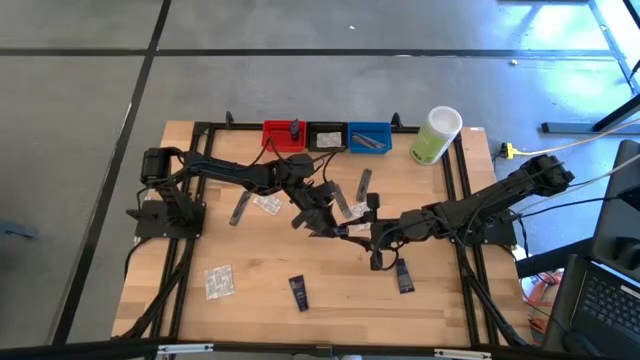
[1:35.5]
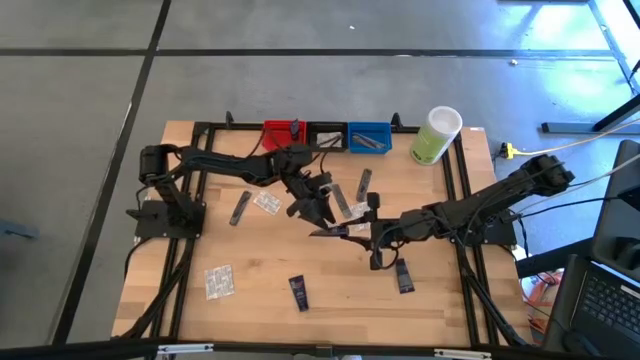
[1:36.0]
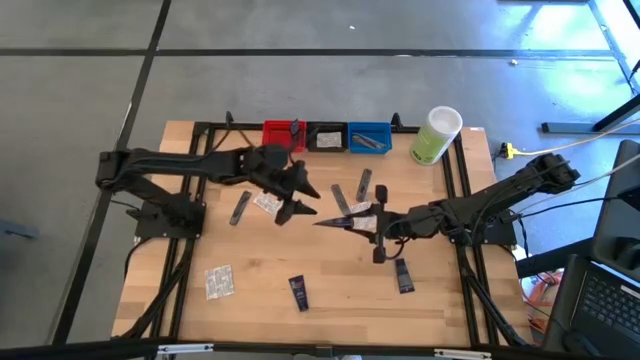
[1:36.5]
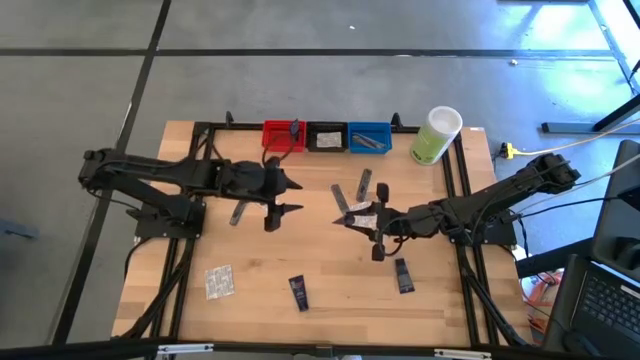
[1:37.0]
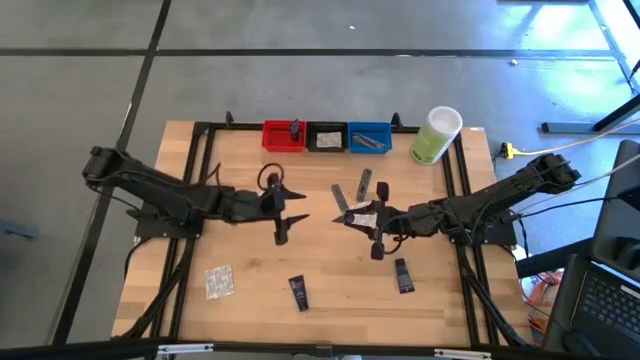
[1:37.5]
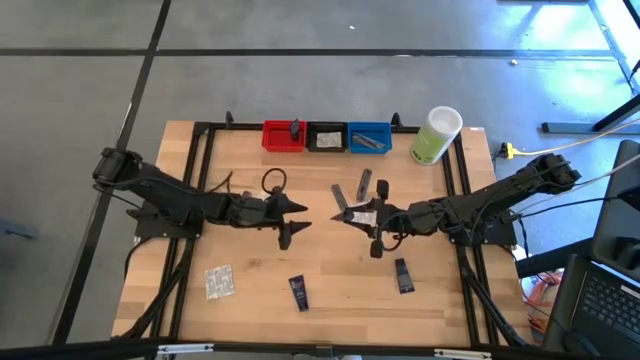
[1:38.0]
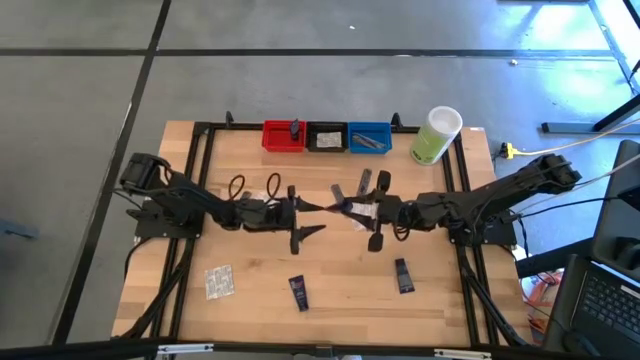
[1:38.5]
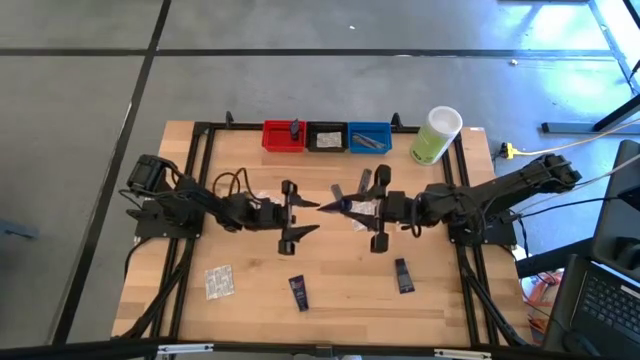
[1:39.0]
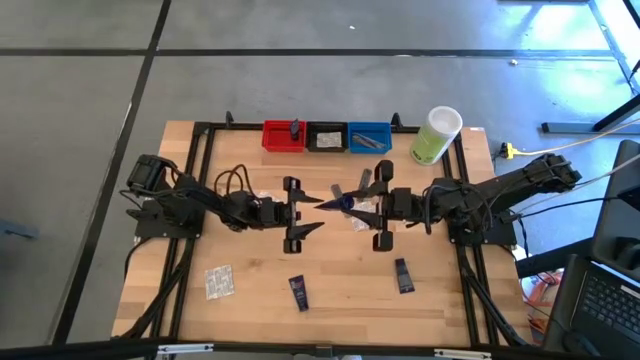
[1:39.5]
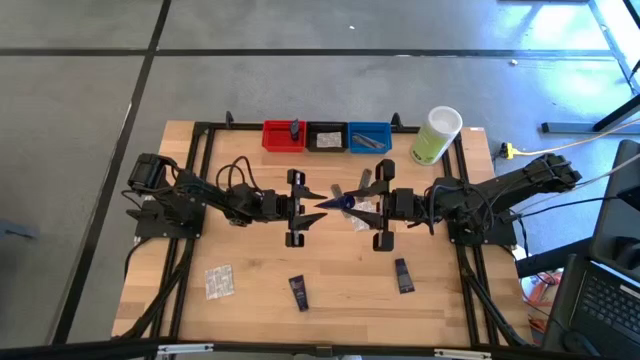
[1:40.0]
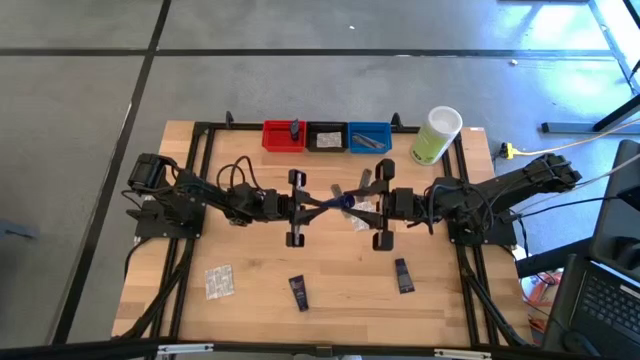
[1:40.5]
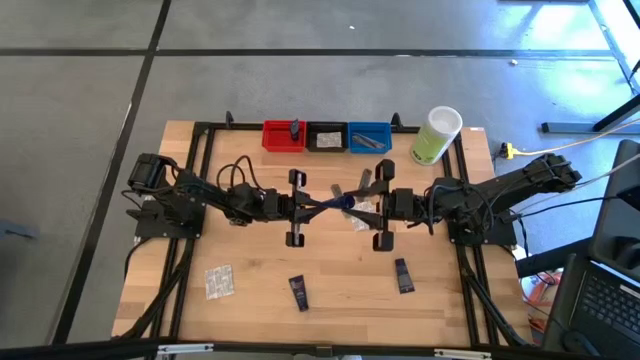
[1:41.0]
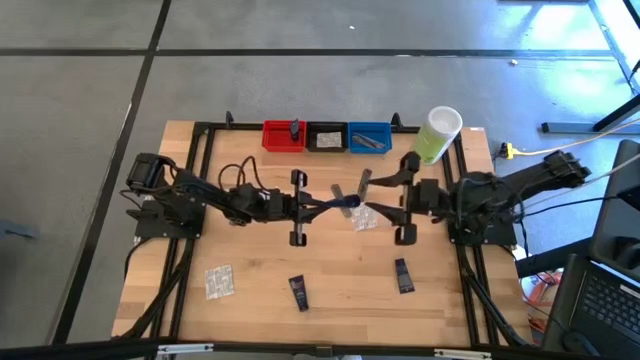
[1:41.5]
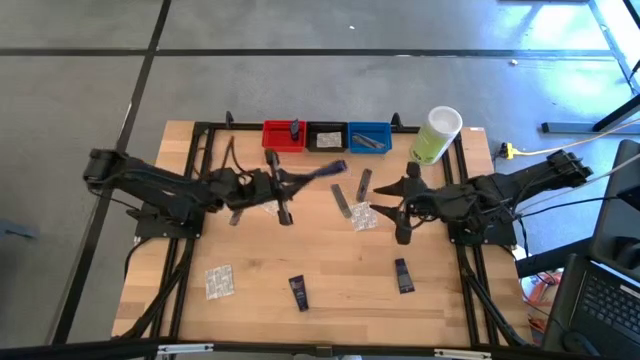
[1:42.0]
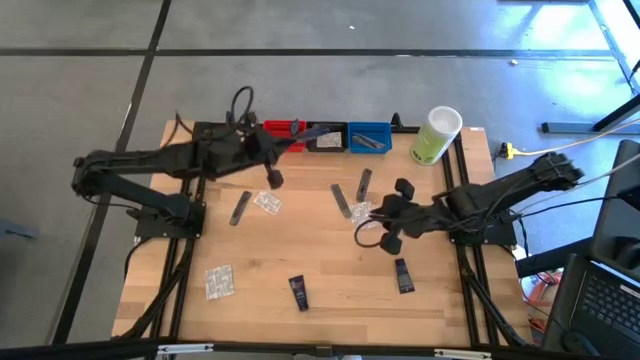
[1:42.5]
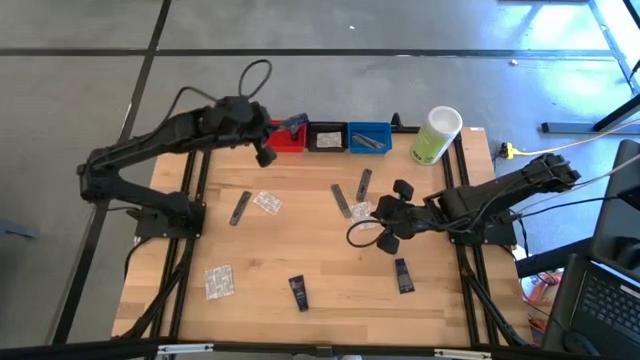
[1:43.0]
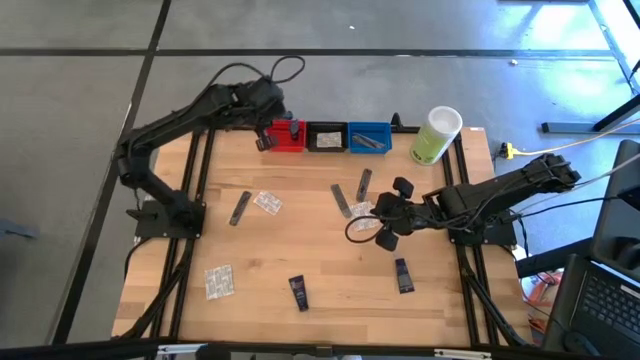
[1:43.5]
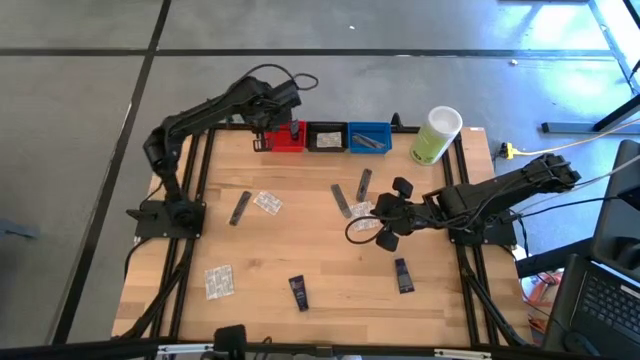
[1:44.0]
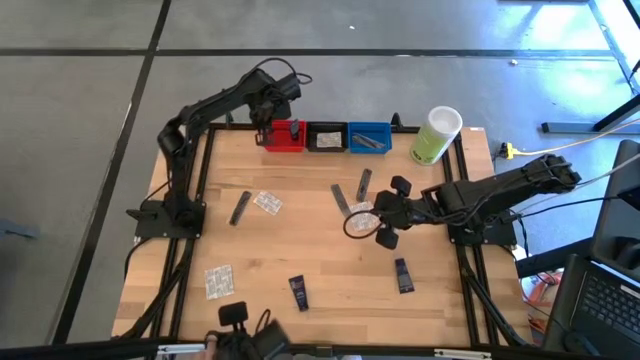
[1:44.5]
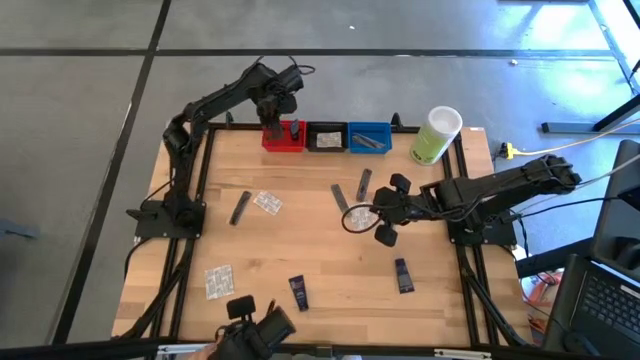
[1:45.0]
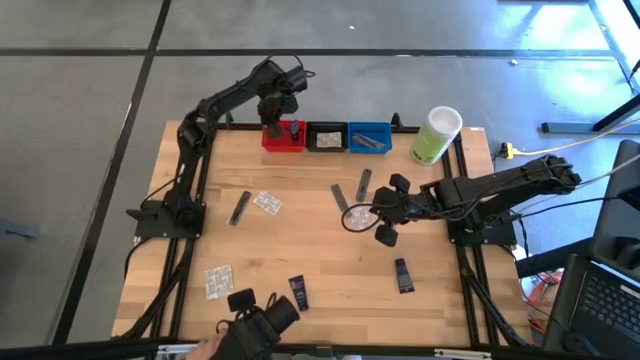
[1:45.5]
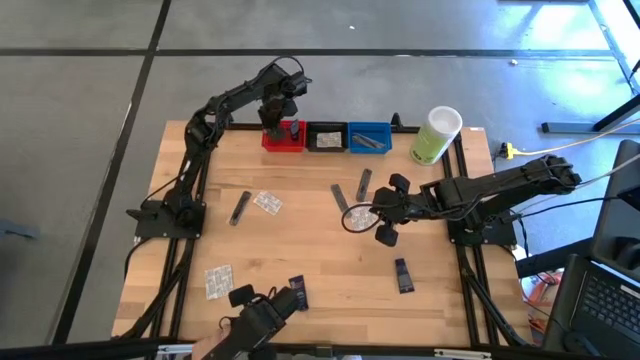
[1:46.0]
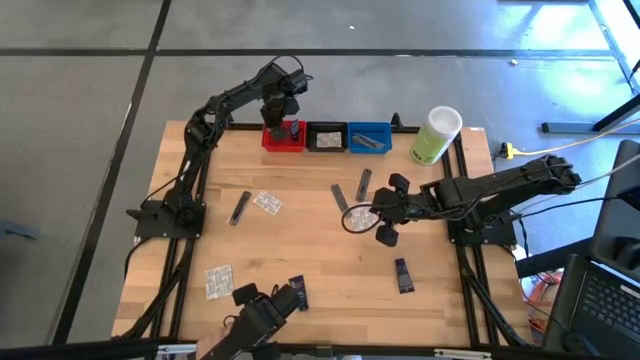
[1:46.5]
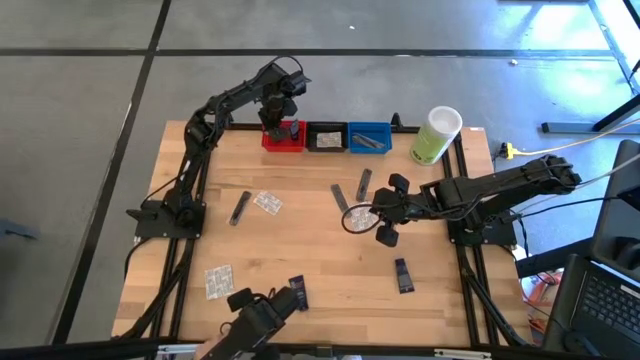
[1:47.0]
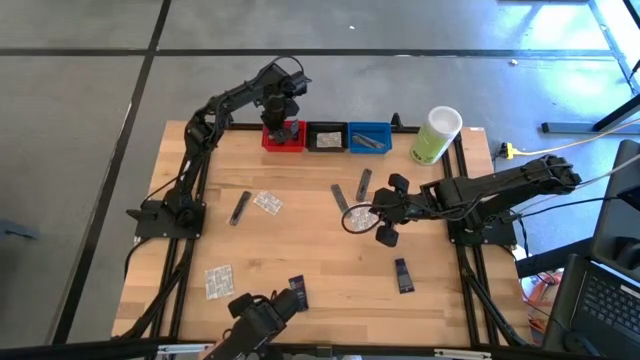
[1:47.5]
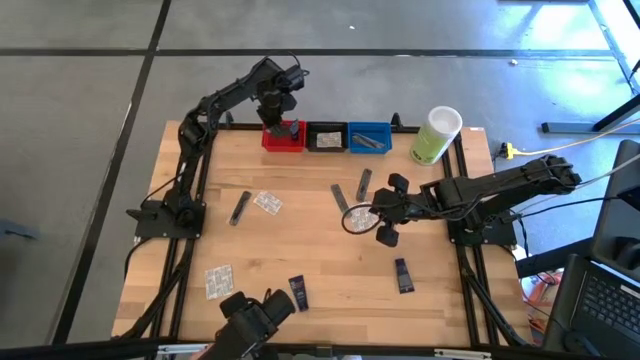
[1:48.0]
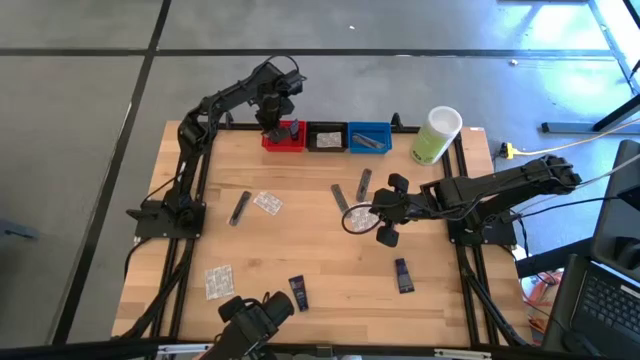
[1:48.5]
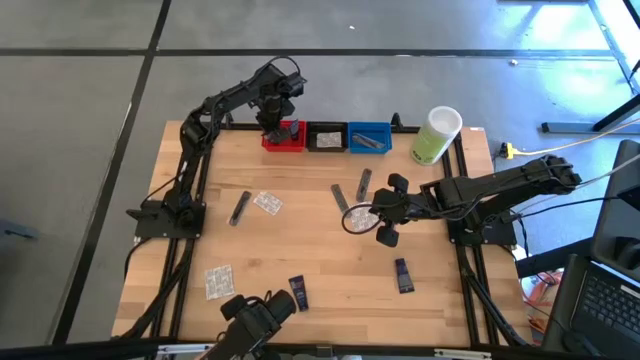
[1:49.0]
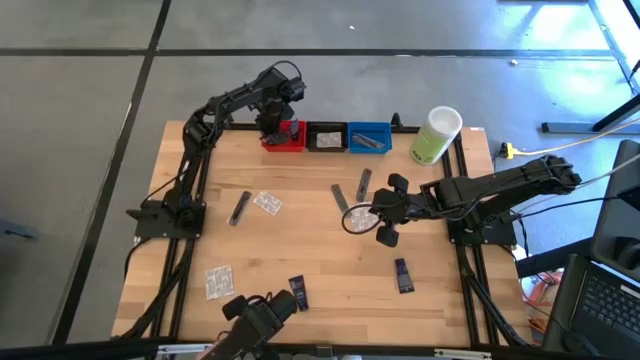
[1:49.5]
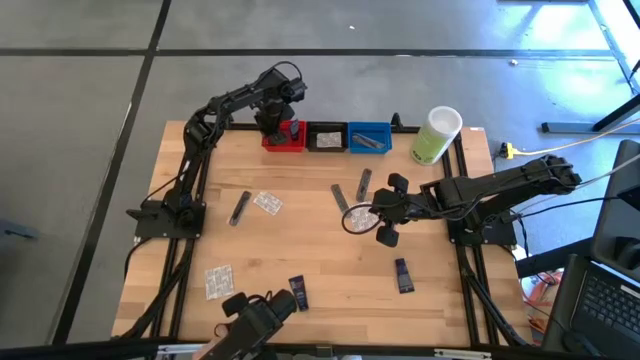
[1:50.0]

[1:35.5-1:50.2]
Task: Pick & Place Travel size toiletries
Put the blue shave cream into the red bin

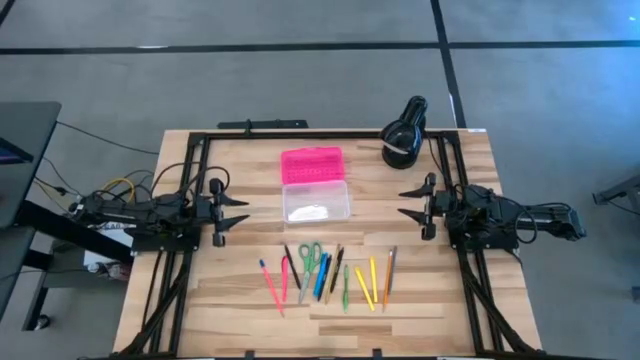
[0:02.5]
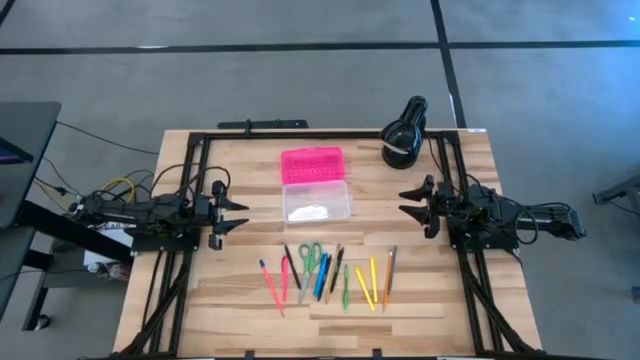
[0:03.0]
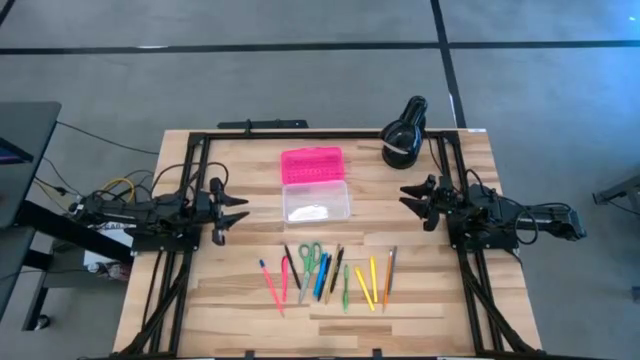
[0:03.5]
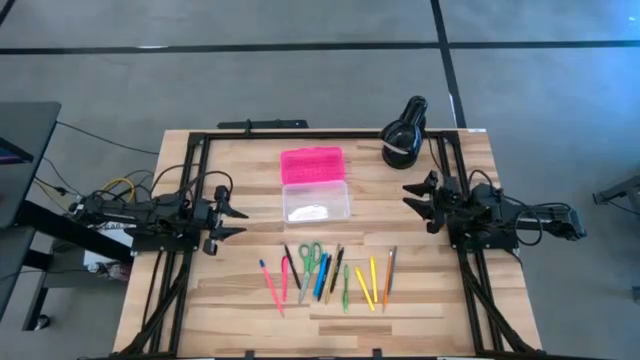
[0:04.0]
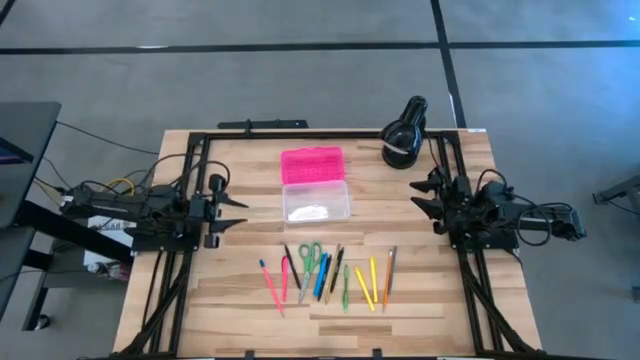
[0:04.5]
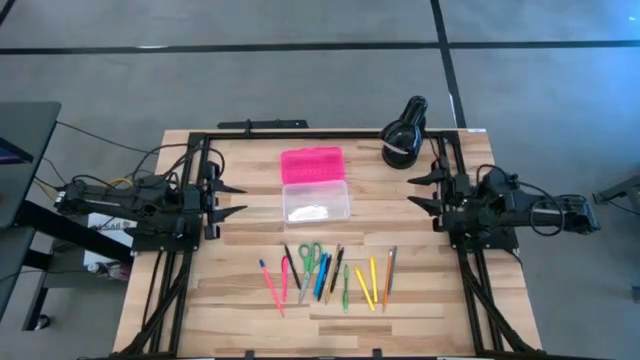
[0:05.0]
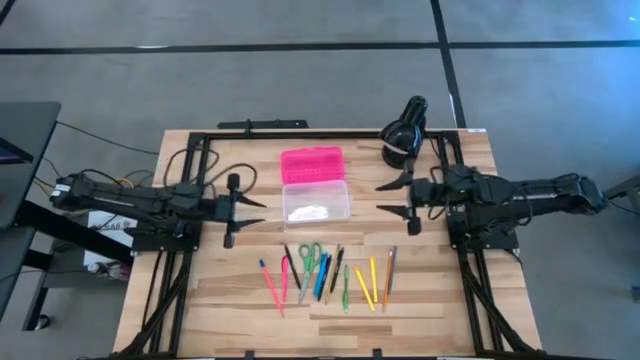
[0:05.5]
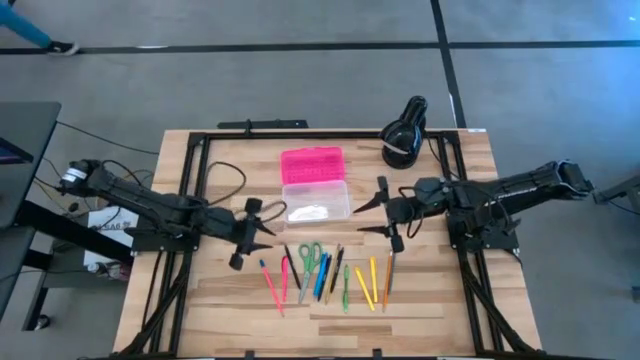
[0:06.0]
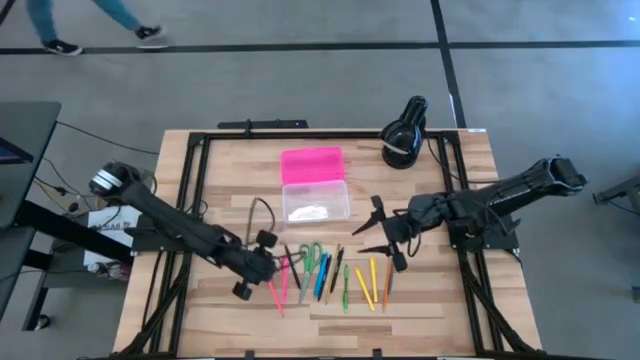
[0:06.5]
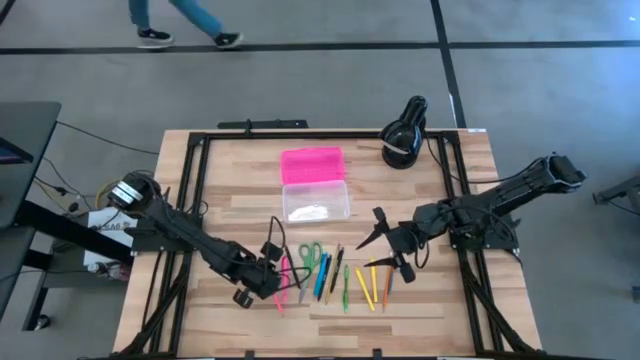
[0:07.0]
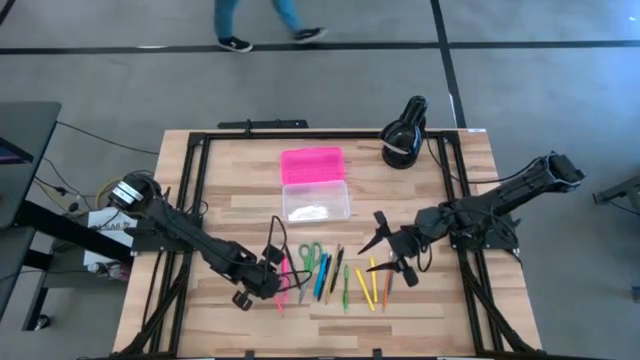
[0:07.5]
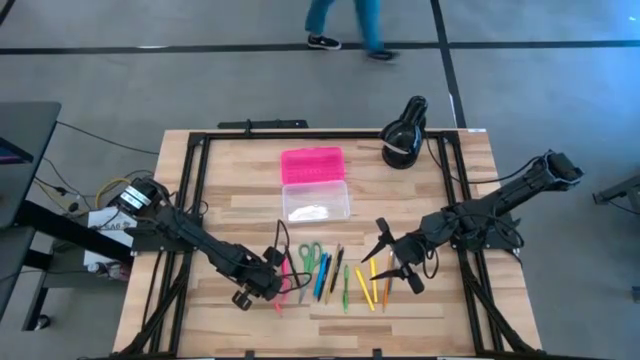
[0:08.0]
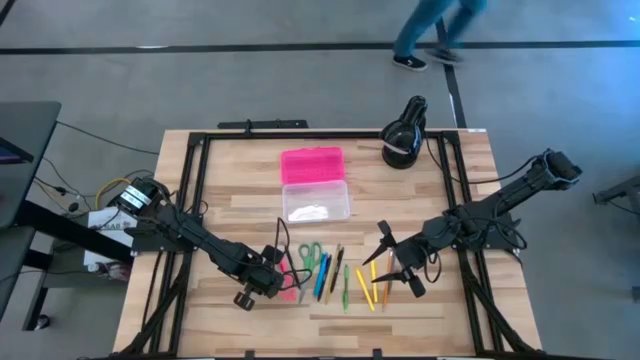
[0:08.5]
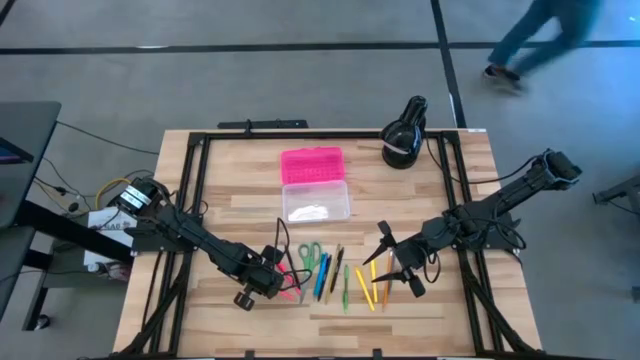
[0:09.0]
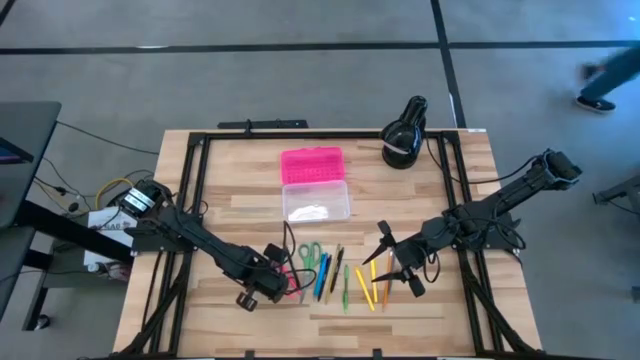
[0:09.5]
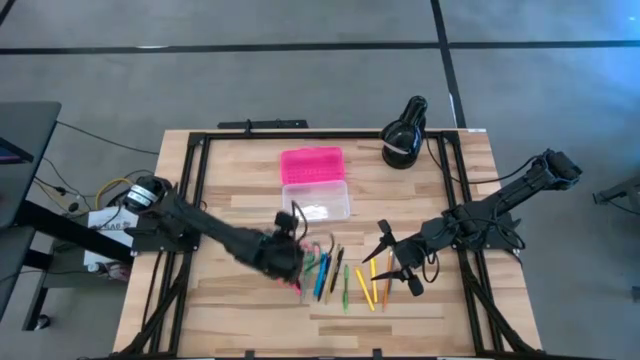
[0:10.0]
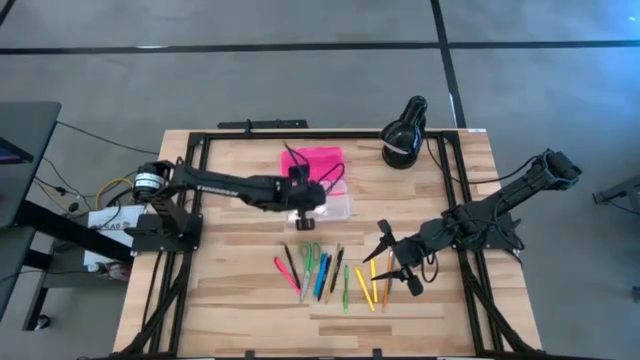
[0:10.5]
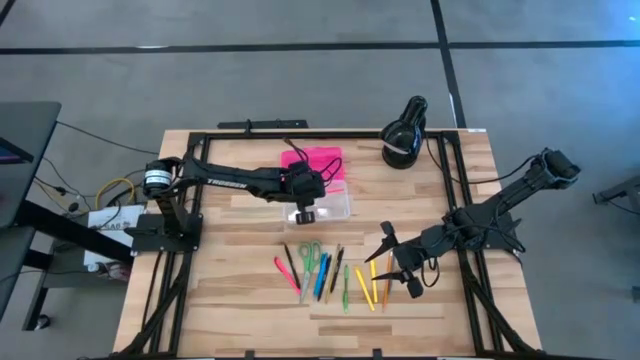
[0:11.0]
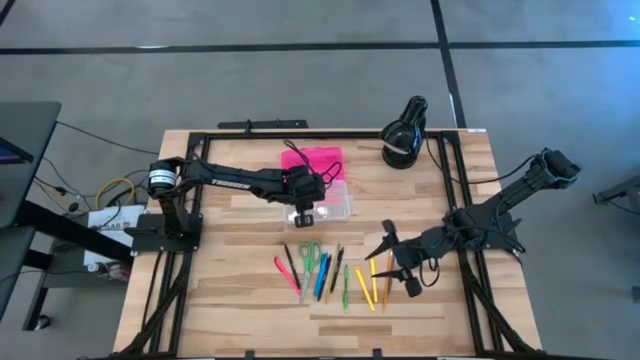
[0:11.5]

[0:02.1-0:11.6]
Task: Pick & place school supplies into a supply box
Put the pink pencil into the supply box
